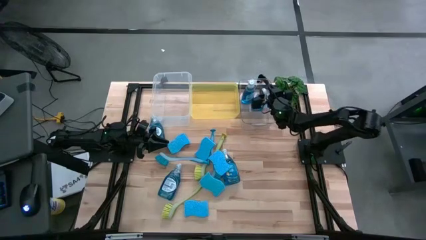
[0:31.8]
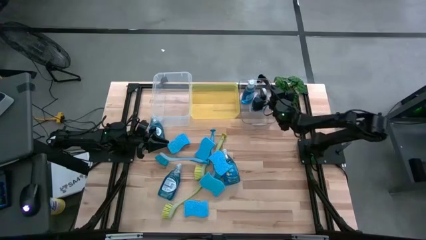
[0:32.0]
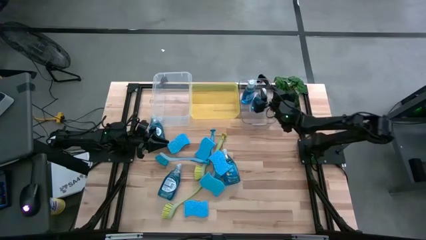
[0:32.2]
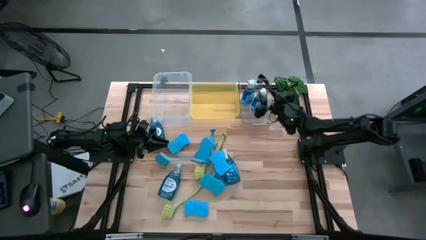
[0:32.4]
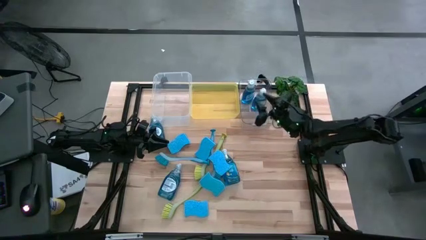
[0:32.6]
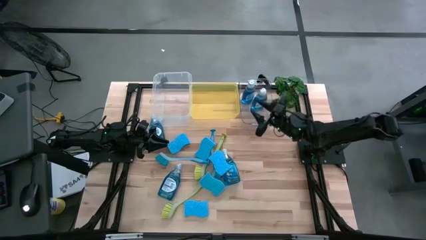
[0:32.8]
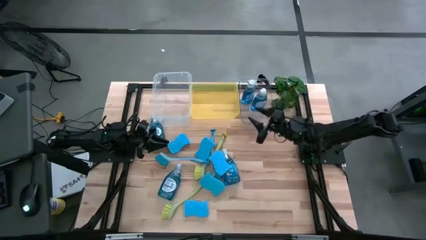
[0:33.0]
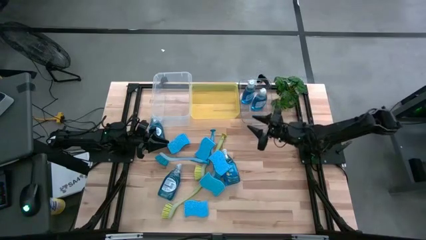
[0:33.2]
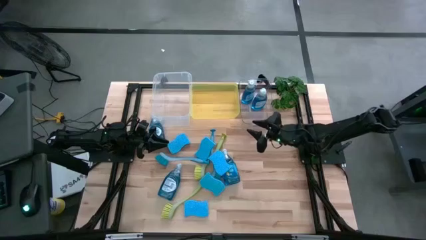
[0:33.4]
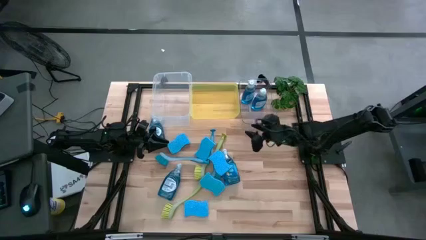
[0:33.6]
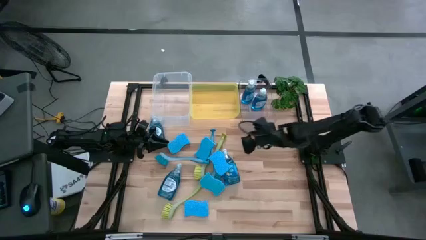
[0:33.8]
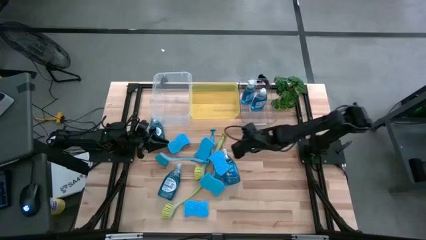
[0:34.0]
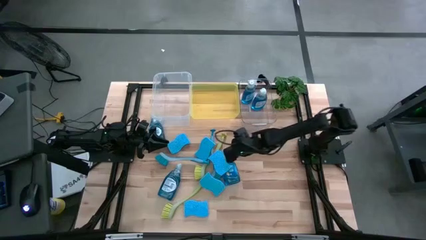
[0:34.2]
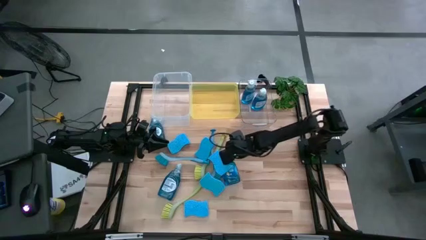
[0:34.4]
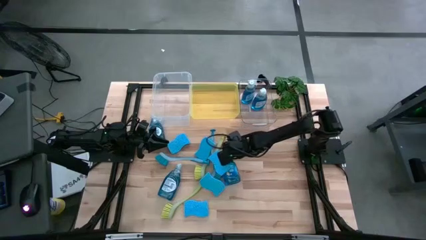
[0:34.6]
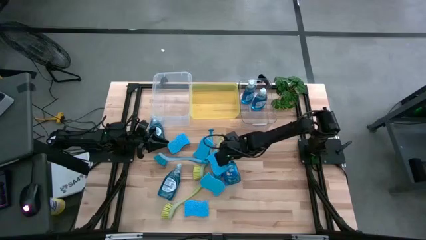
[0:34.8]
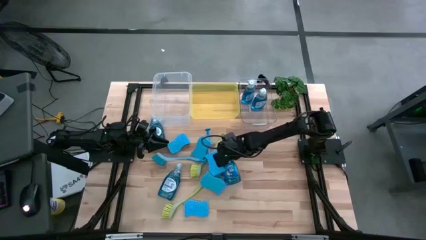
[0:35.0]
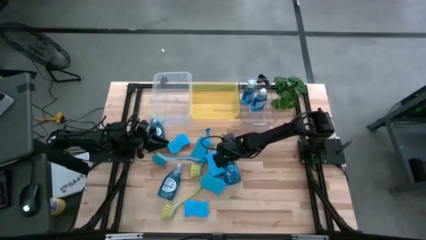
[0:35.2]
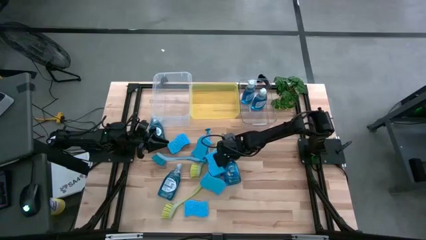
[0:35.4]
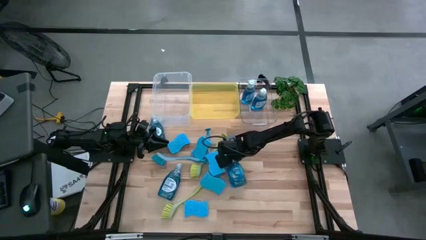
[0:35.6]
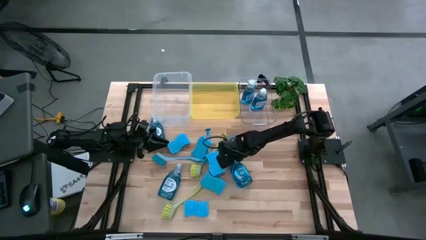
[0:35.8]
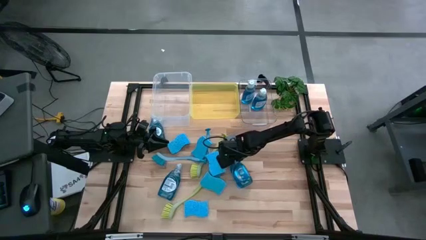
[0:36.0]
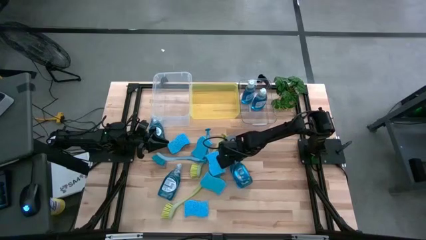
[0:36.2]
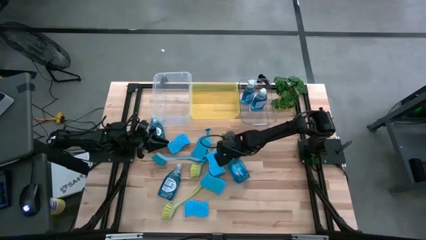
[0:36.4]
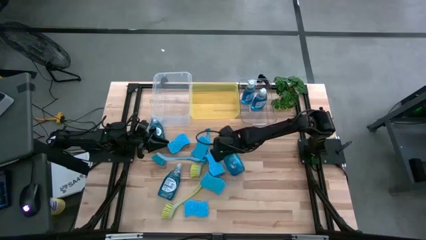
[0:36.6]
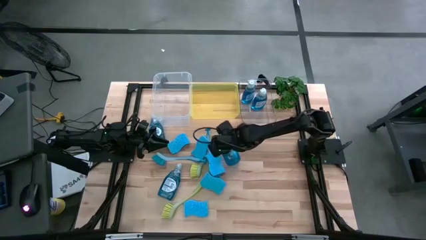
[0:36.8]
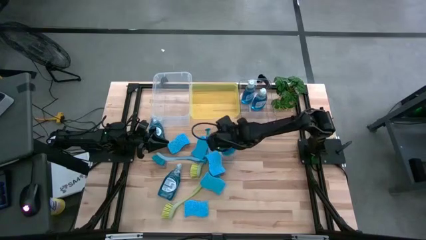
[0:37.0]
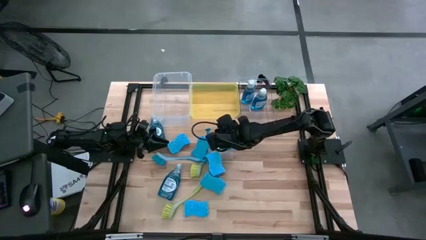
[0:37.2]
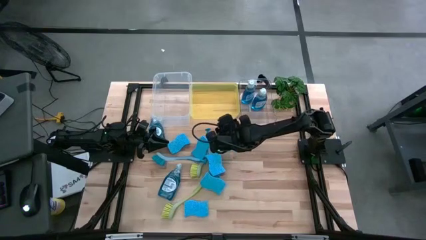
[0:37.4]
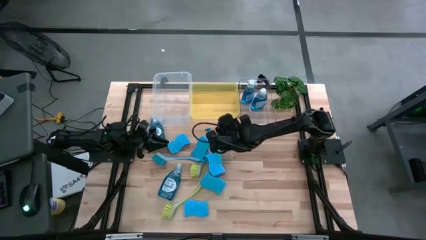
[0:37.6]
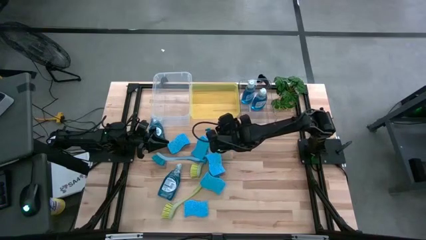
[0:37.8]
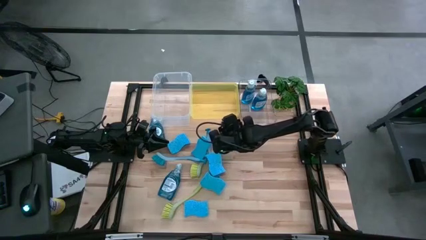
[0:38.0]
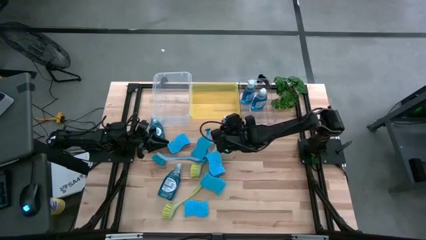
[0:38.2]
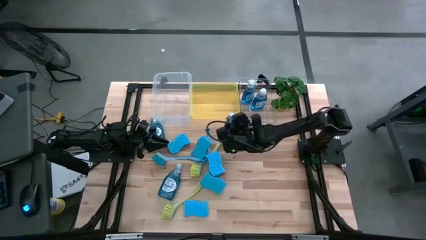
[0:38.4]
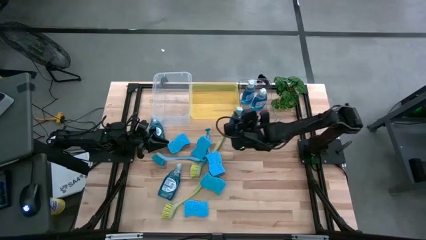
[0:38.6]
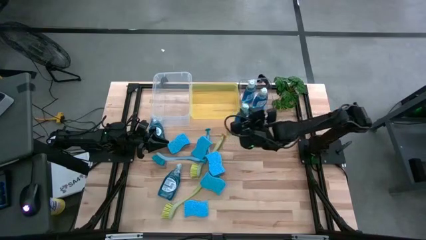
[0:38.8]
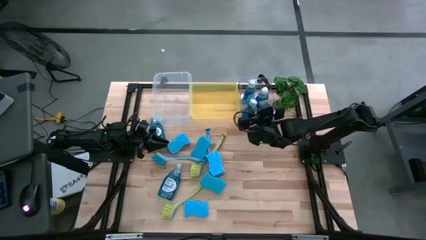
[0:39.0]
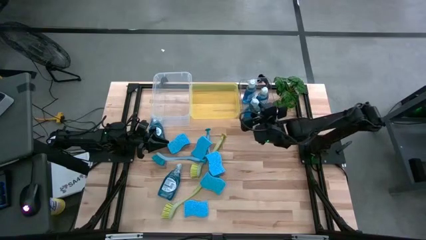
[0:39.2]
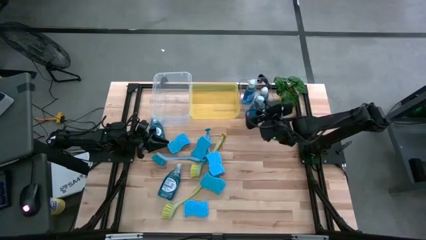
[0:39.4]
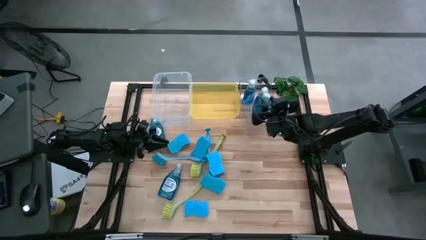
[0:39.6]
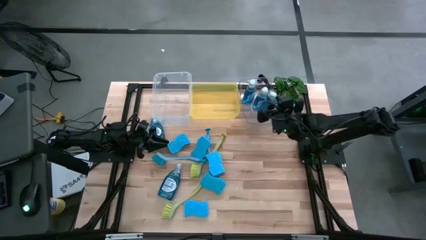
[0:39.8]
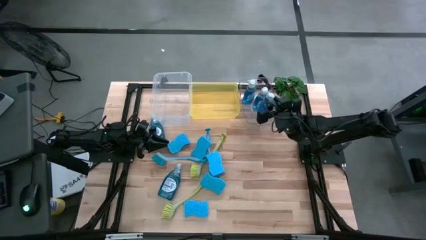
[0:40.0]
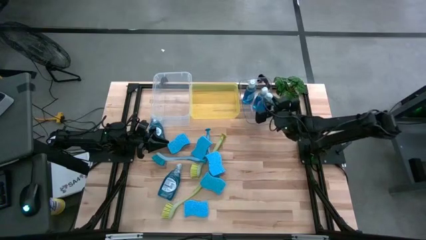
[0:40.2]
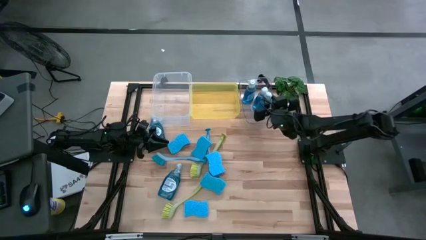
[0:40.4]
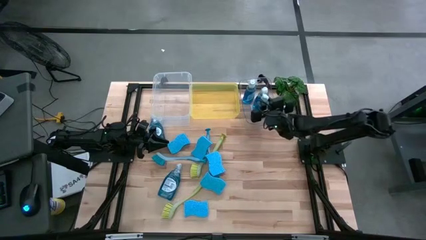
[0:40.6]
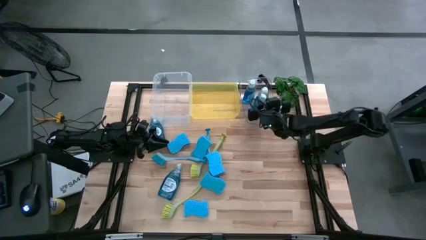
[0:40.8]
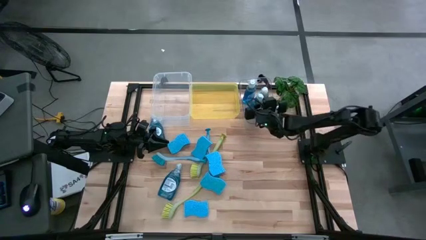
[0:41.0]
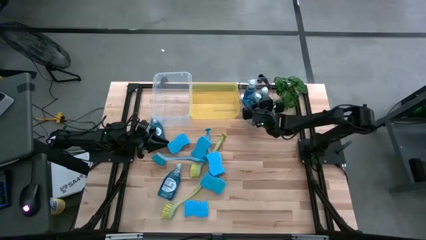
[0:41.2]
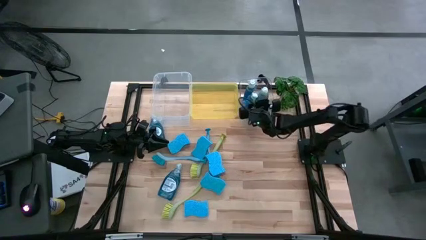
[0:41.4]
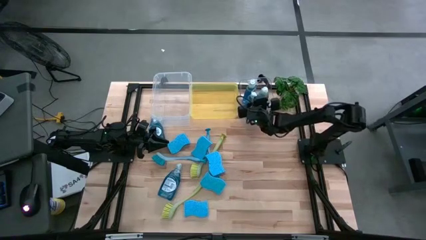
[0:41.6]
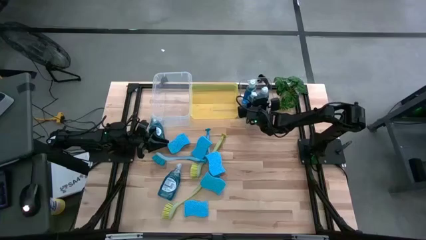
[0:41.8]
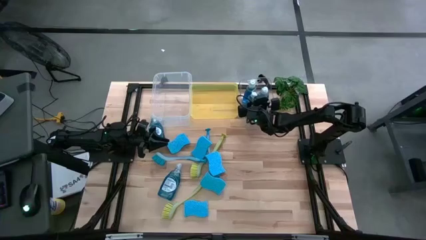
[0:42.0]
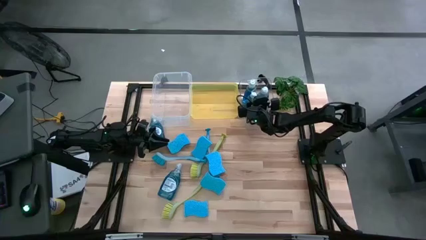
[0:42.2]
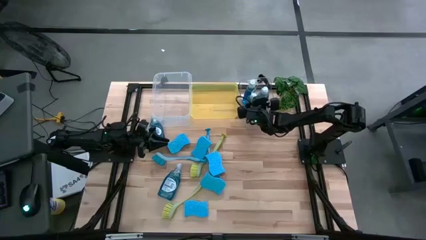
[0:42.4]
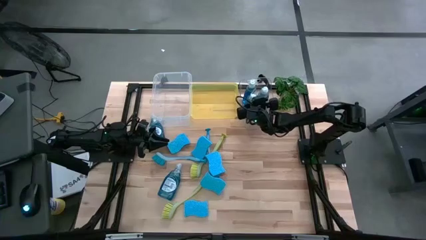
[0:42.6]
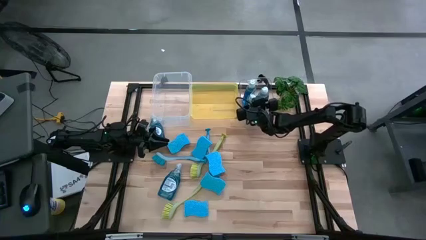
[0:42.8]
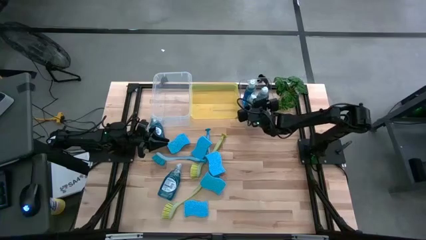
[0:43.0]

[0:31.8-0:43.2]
Task: Pick & Place Kitchen Sink Supplies
Put the blue dishwasher liquid into the transparent bin
